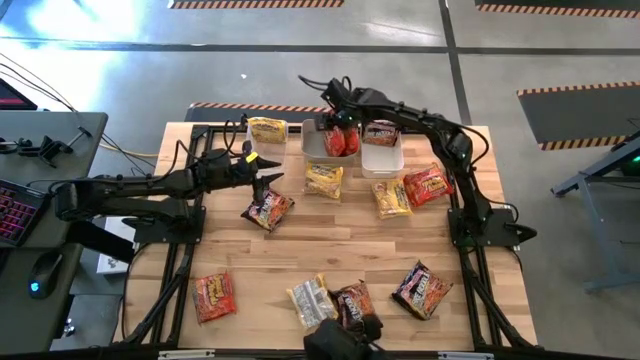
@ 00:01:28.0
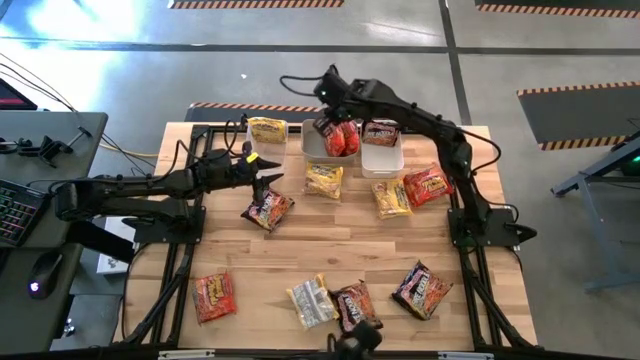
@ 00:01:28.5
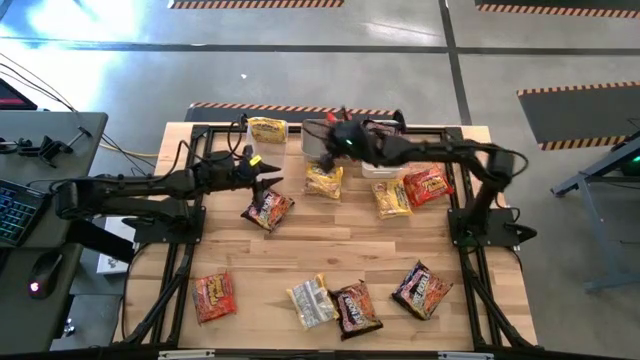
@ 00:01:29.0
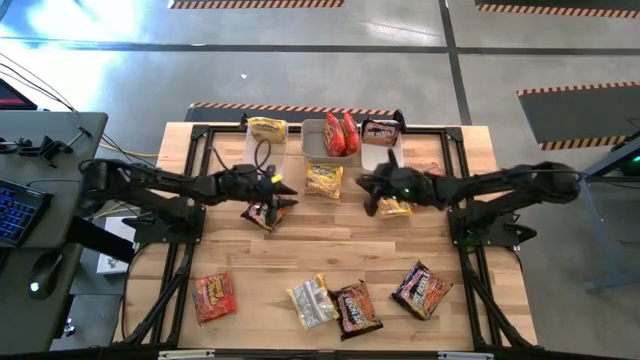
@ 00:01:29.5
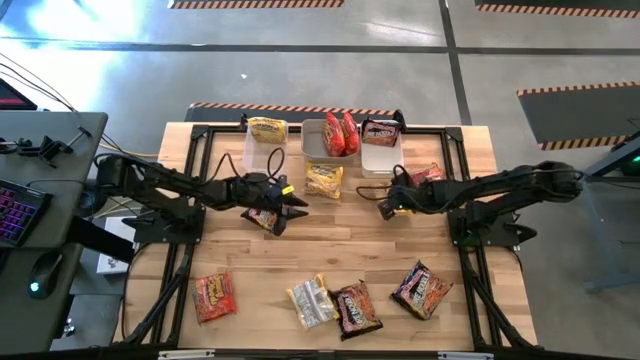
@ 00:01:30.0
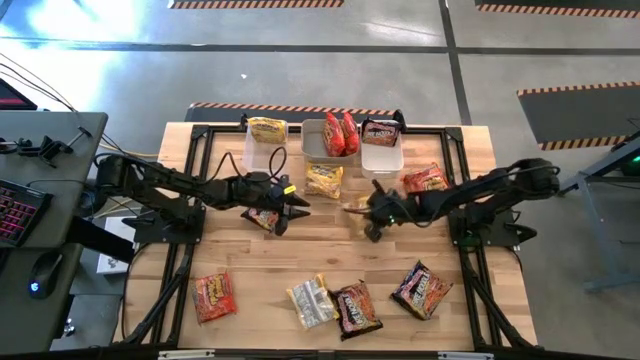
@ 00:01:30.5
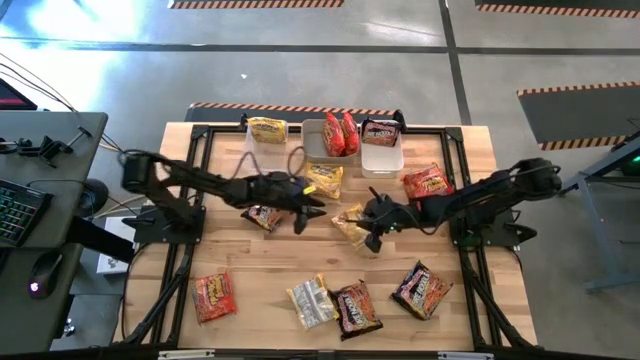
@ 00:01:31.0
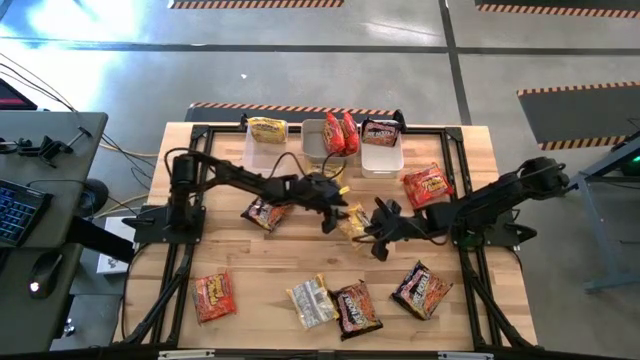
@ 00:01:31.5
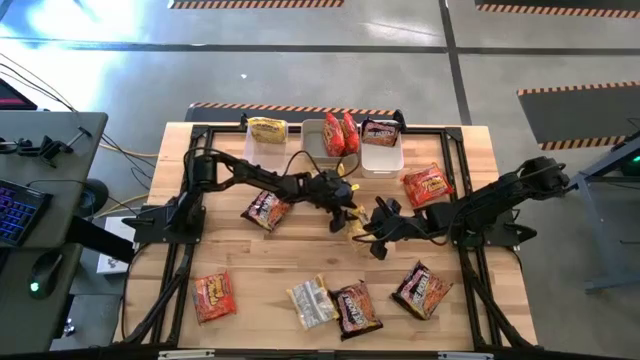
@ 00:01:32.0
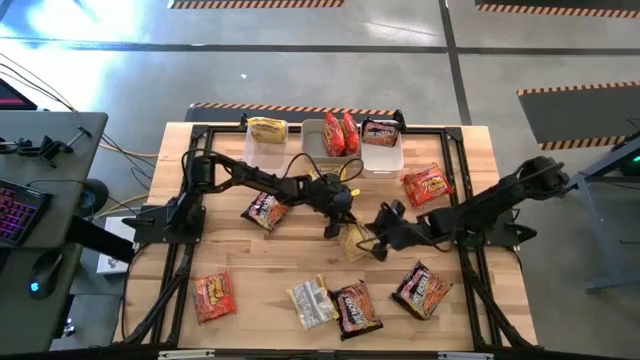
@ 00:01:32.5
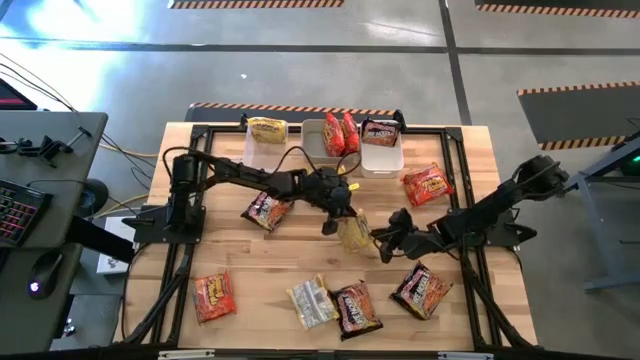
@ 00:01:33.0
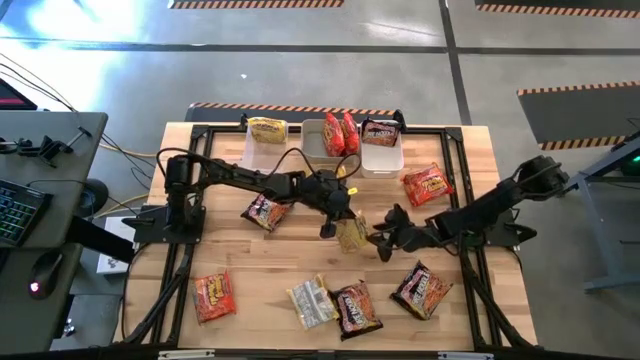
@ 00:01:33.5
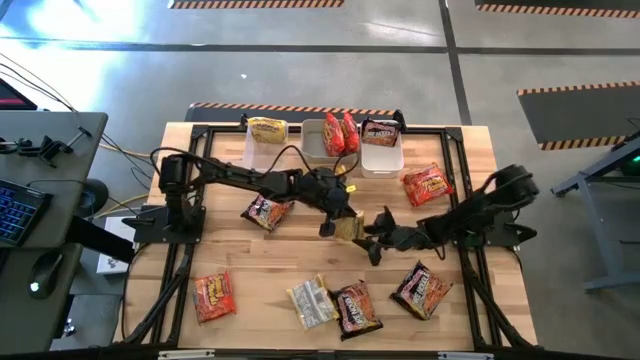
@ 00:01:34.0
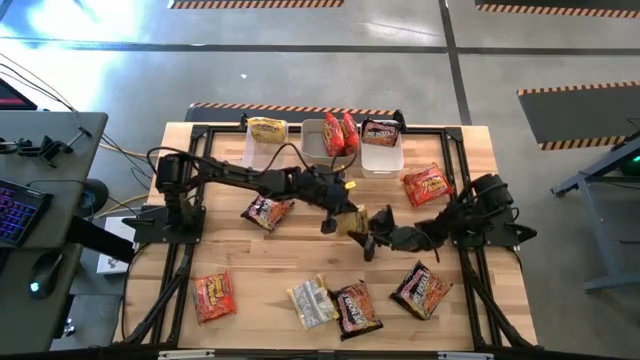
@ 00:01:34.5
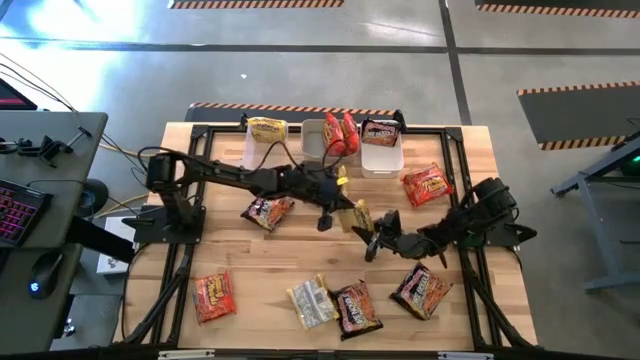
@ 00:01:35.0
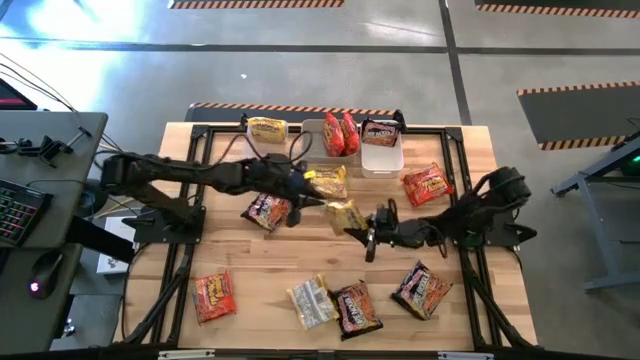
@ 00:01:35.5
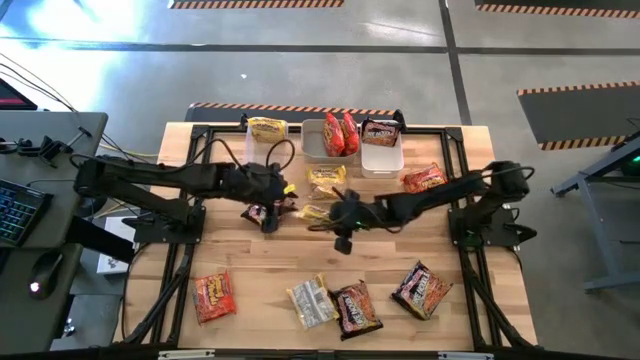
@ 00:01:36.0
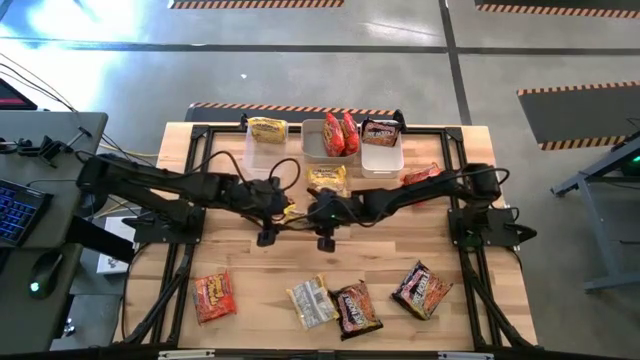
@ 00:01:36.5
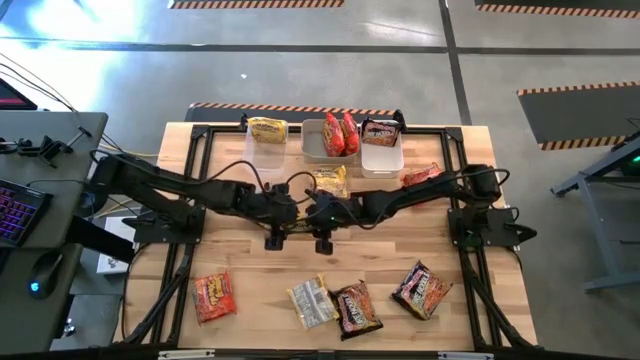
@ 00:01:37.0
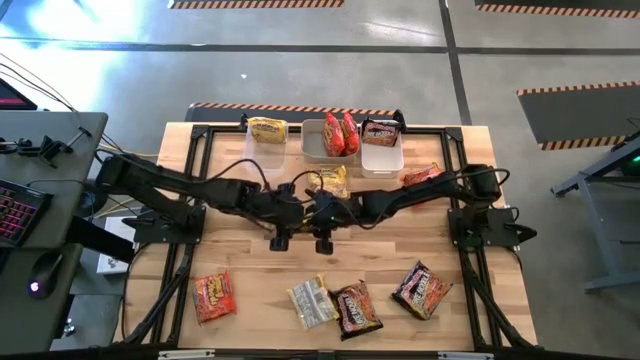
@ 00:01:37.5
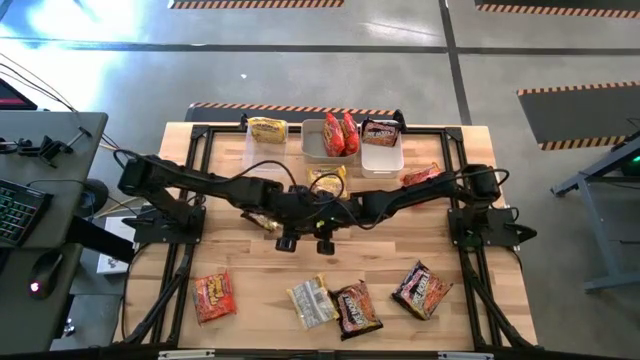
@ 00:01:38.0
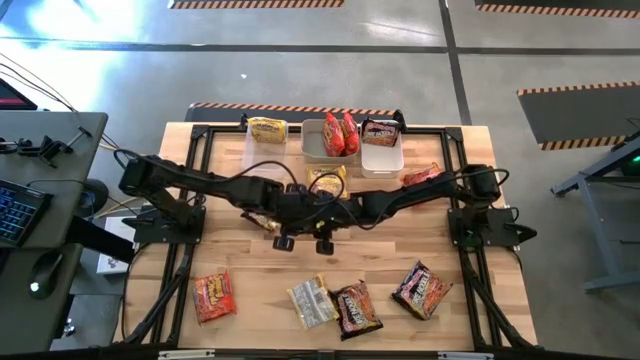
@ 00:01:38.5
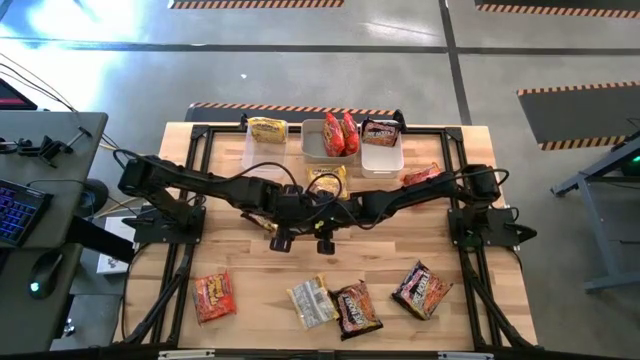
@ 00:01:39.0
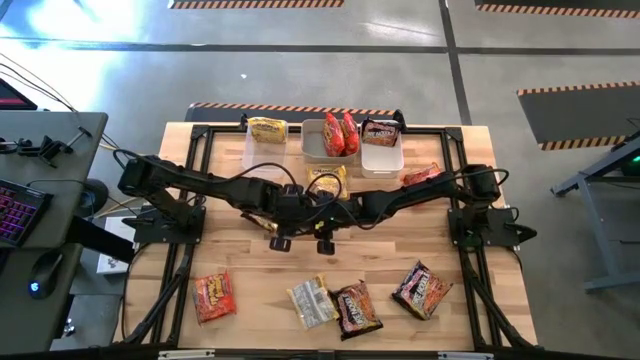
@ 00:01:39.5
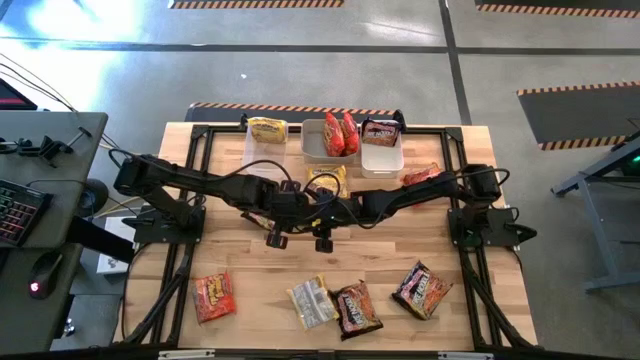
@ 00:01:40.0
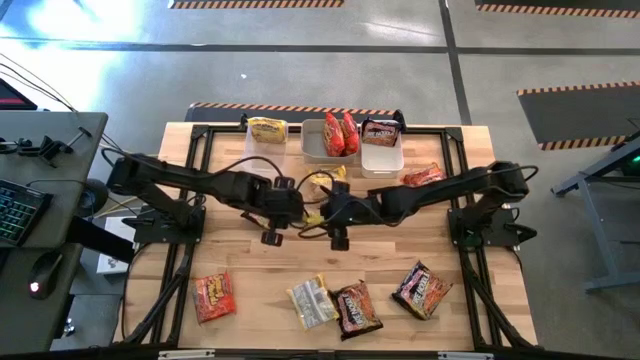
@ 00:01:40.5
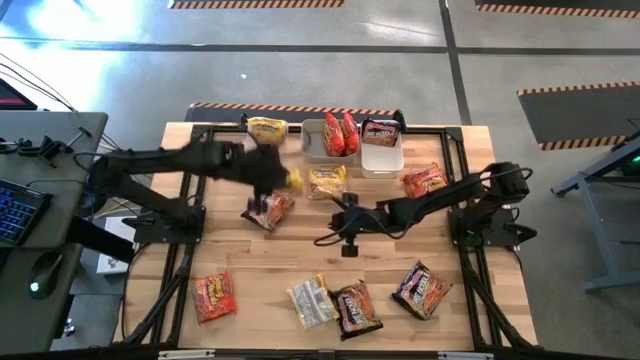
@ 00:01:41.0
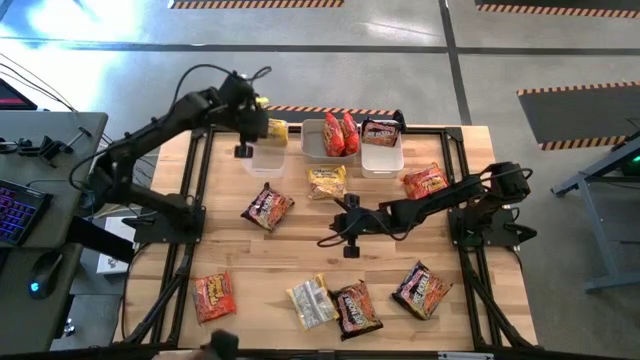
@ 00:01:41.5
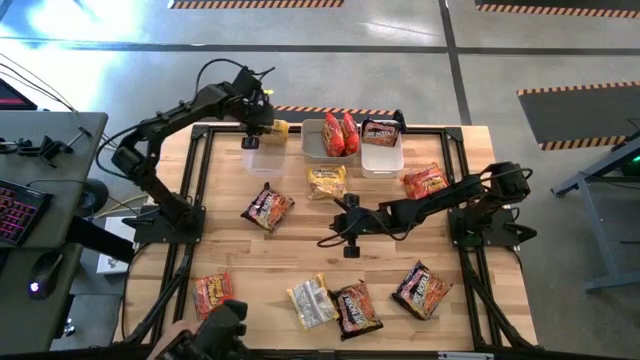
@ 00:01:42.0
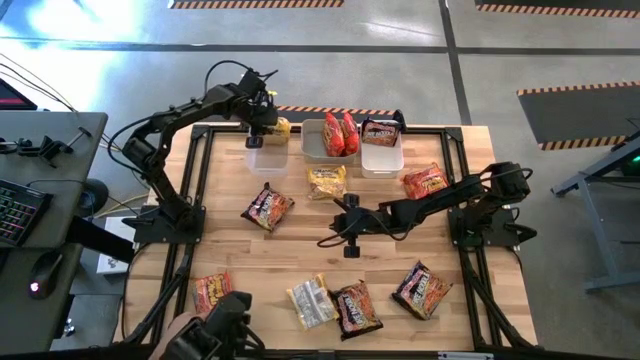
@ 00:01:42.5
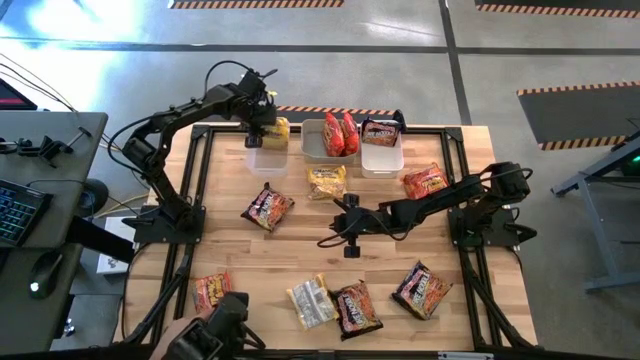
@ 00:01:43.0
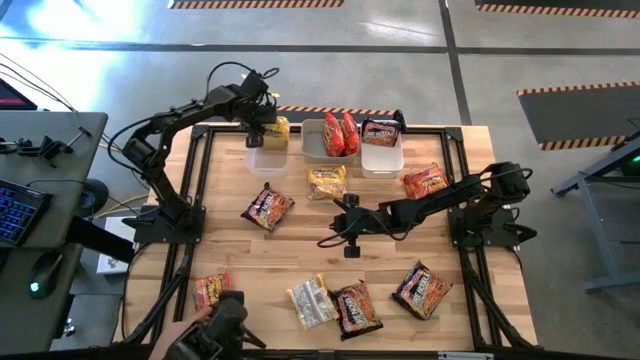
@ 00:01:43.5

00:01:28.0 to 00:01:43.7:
Task: Sort Maruchan noodles
Put the top right yellow noodle pack into the transparent bin

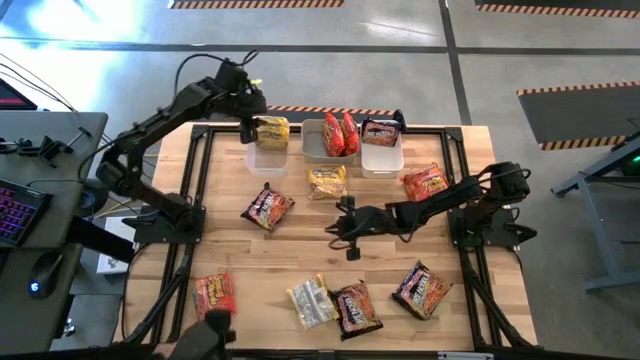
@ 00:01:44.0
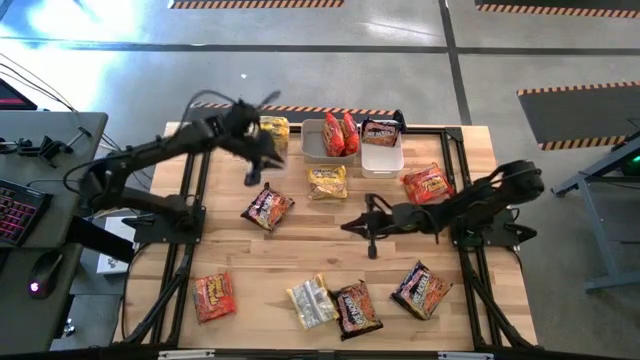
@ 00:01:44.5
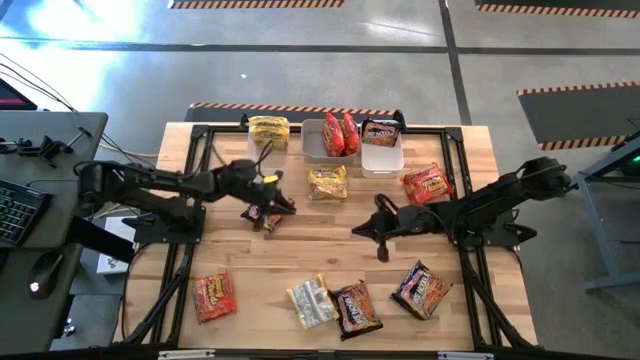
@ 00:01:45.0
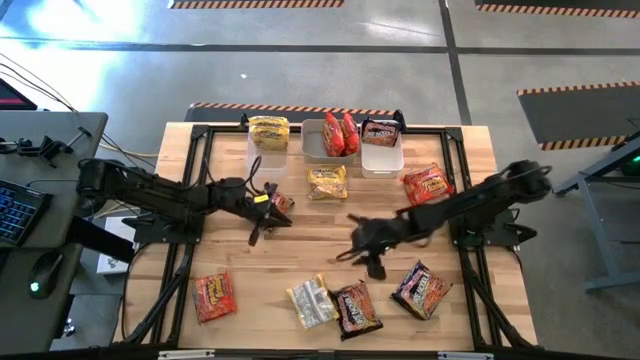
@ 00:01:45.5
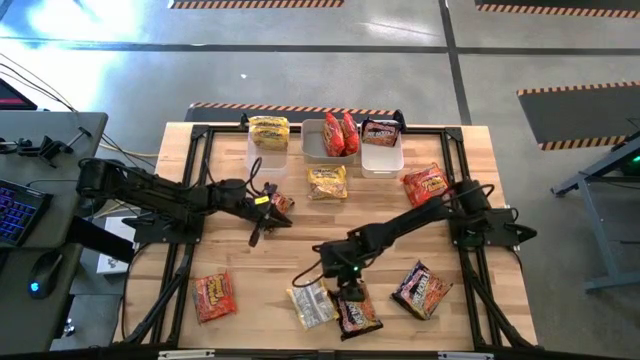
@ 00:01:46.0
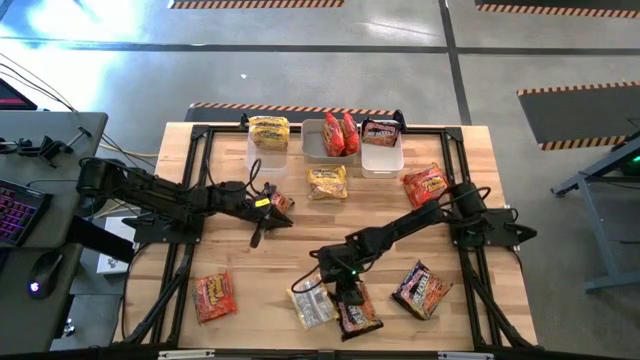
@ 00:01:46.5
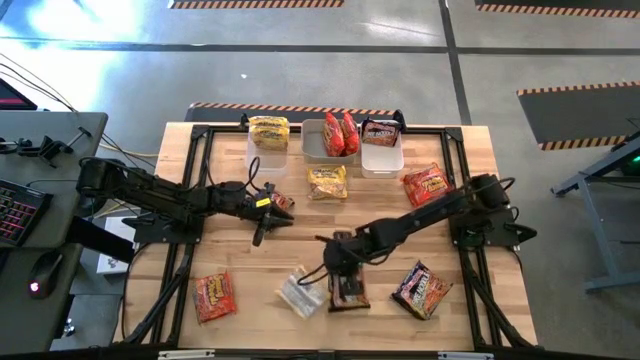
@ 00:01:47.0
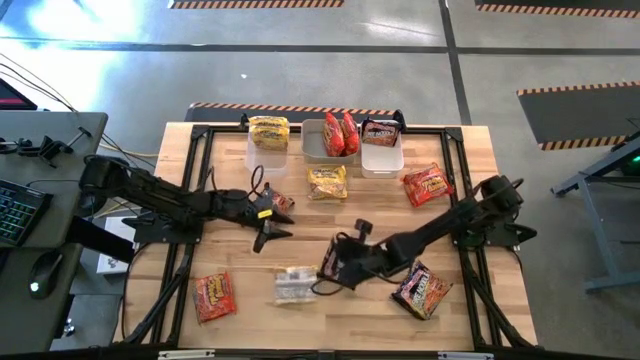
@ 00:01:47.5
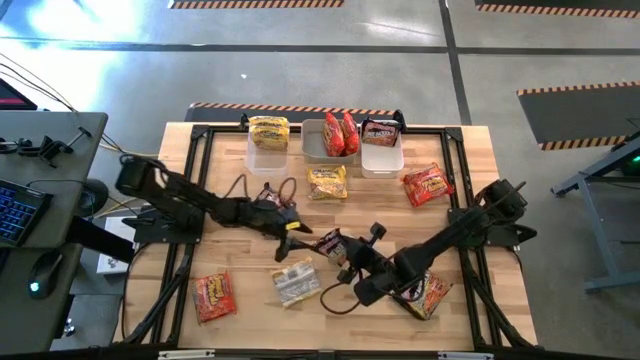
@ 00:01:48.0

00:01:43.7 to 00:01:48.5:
Put the bottom left black noodle pack into the white bin
